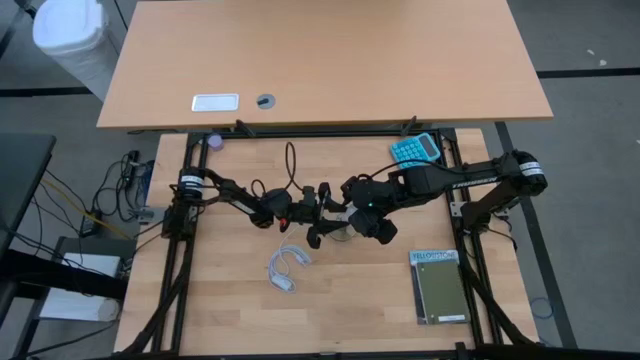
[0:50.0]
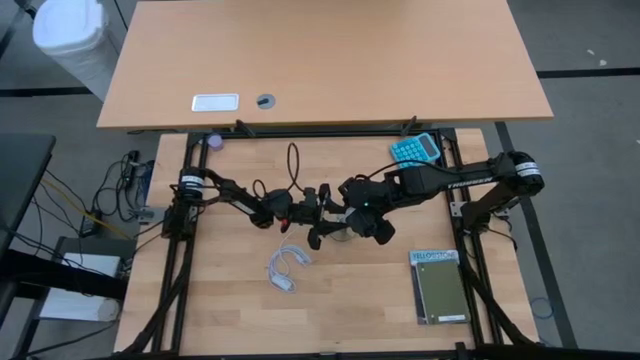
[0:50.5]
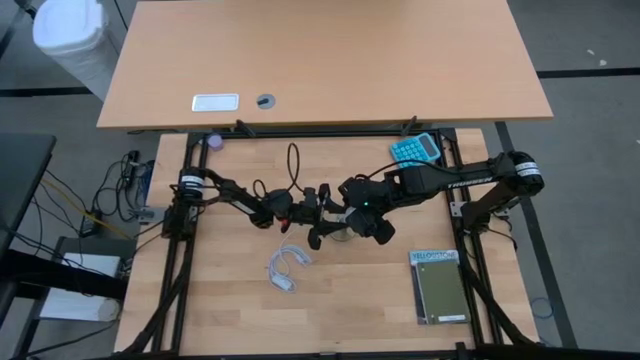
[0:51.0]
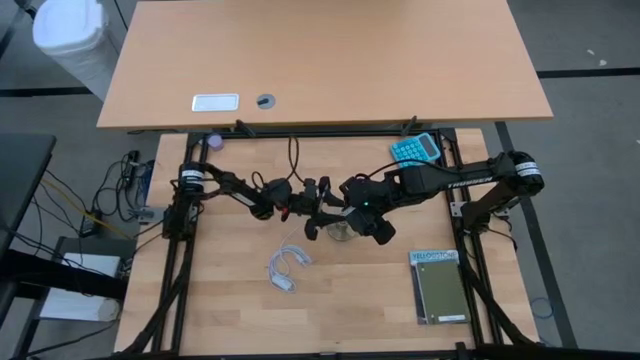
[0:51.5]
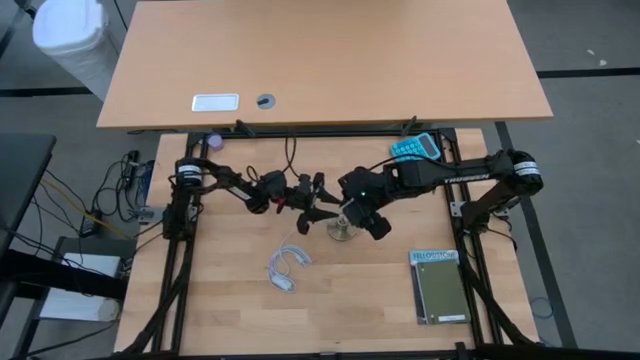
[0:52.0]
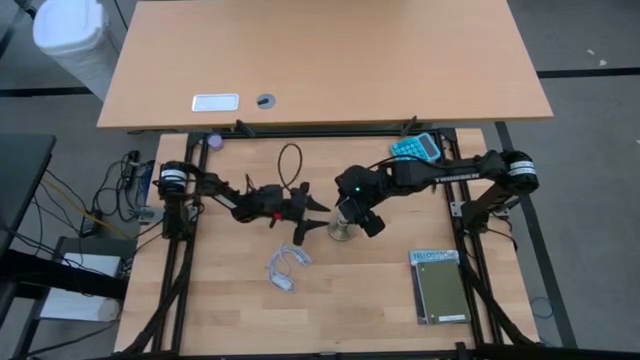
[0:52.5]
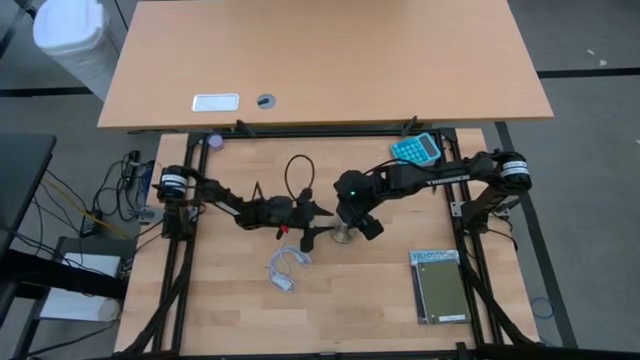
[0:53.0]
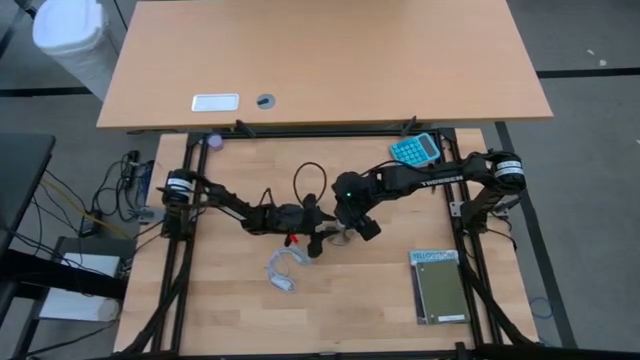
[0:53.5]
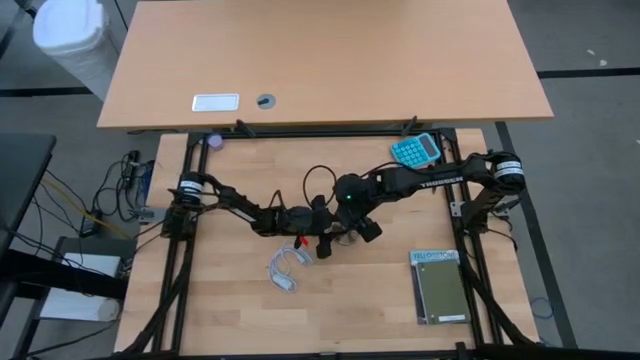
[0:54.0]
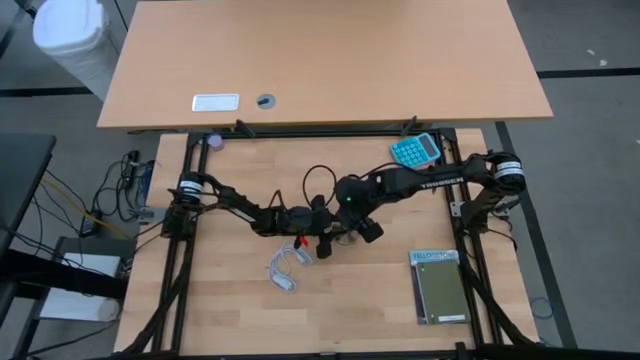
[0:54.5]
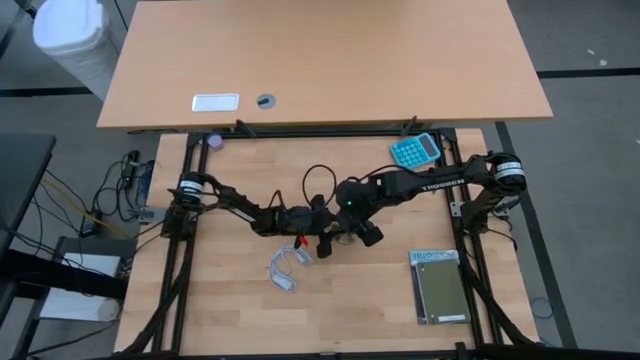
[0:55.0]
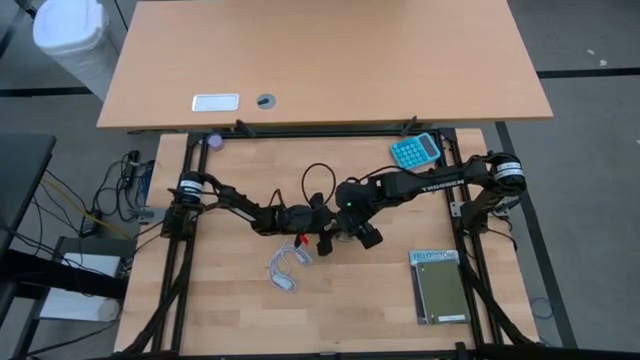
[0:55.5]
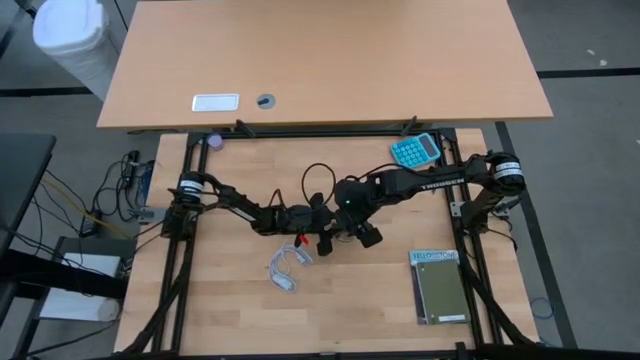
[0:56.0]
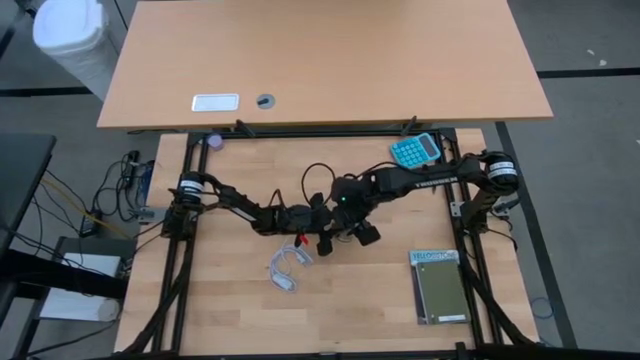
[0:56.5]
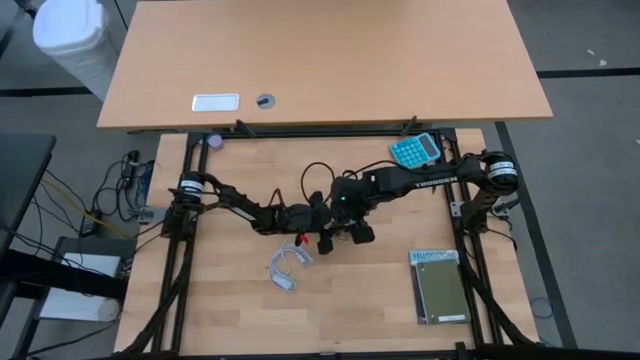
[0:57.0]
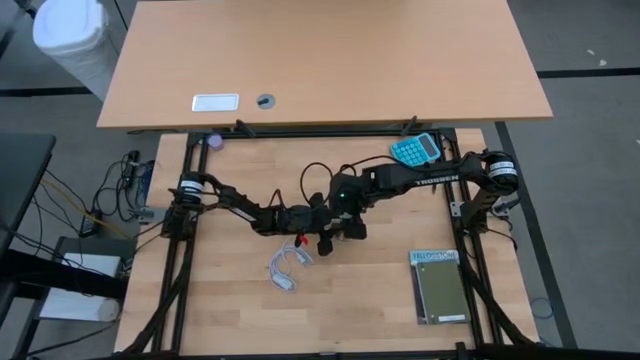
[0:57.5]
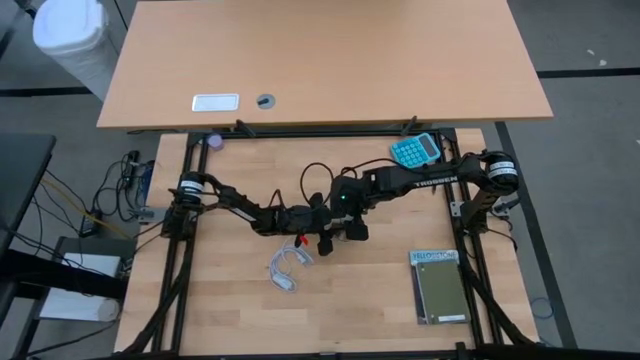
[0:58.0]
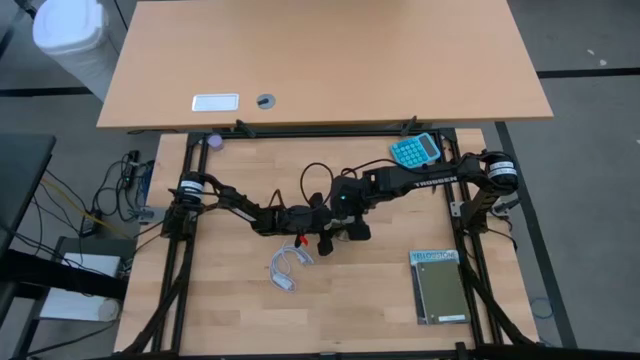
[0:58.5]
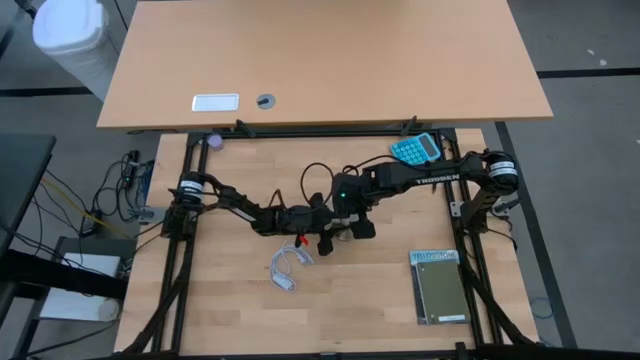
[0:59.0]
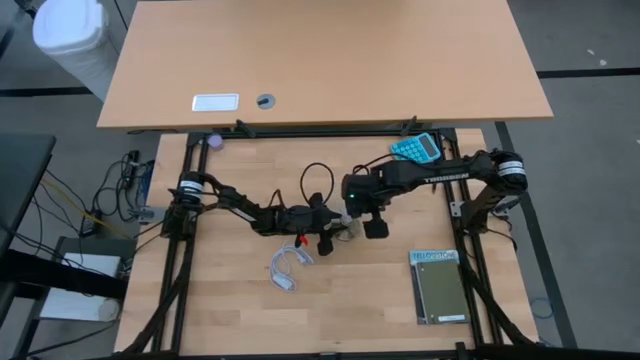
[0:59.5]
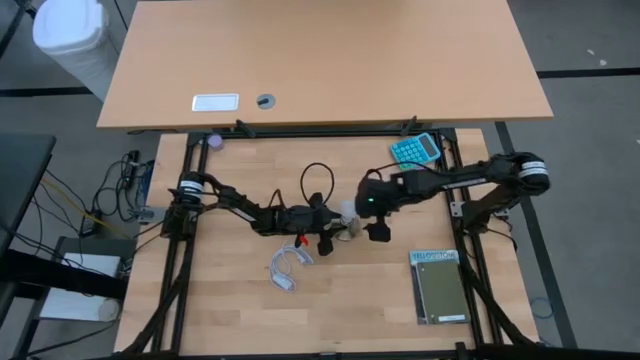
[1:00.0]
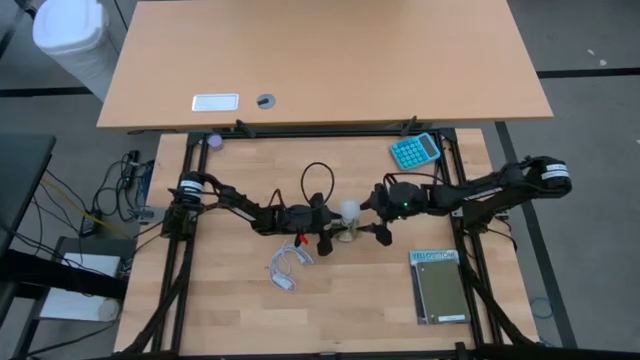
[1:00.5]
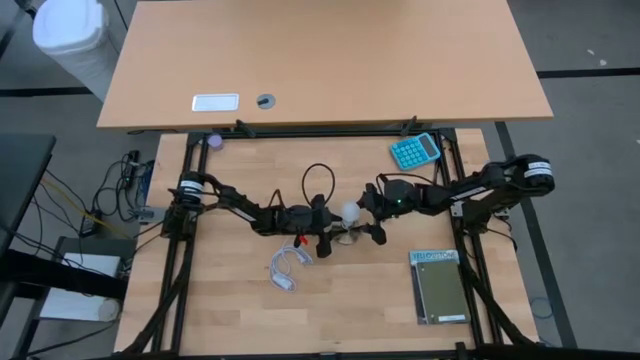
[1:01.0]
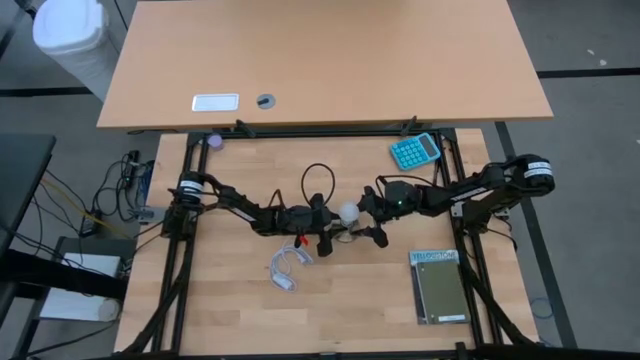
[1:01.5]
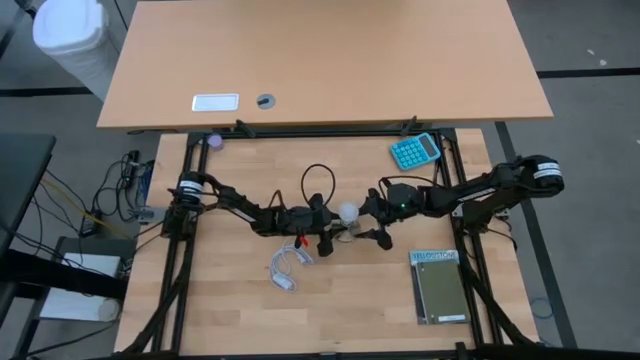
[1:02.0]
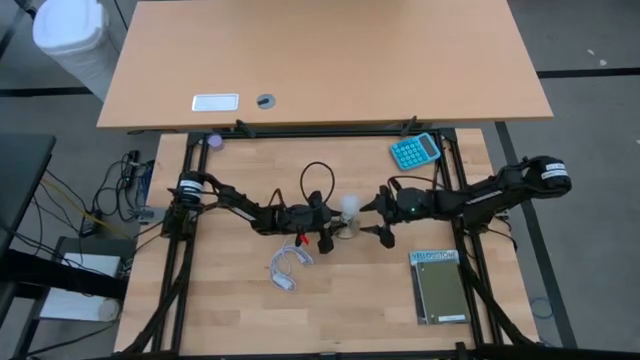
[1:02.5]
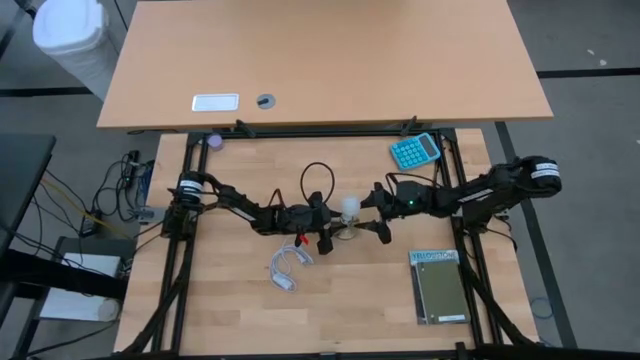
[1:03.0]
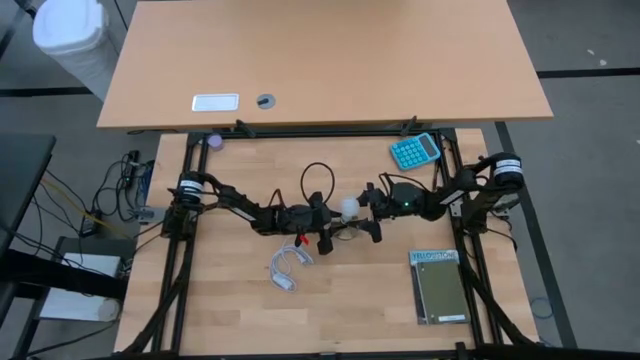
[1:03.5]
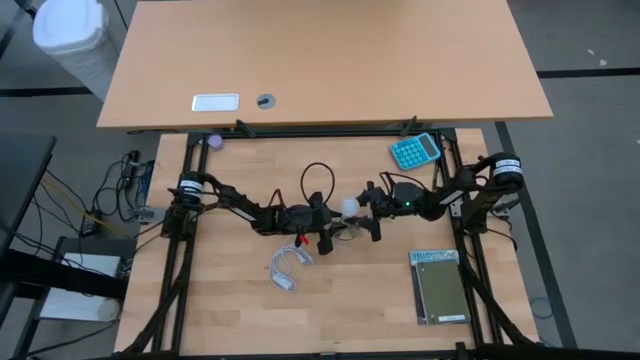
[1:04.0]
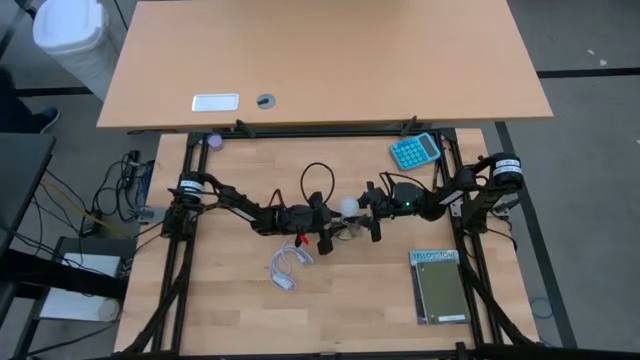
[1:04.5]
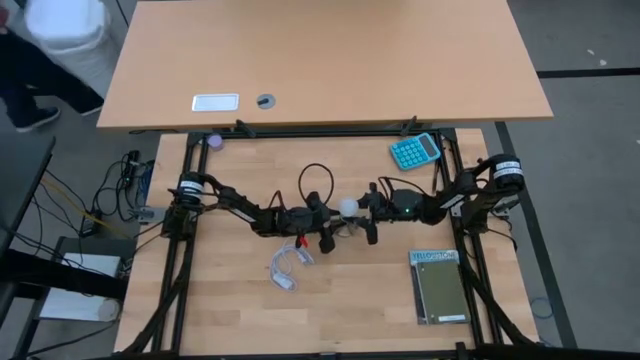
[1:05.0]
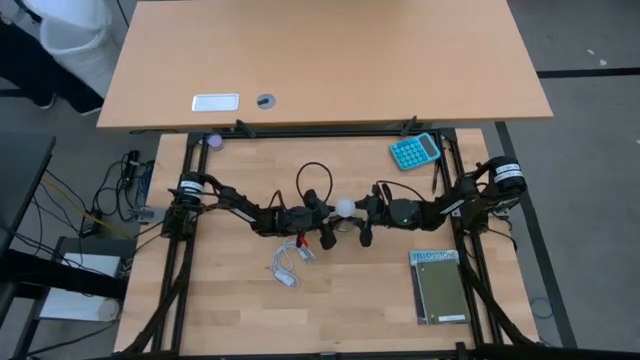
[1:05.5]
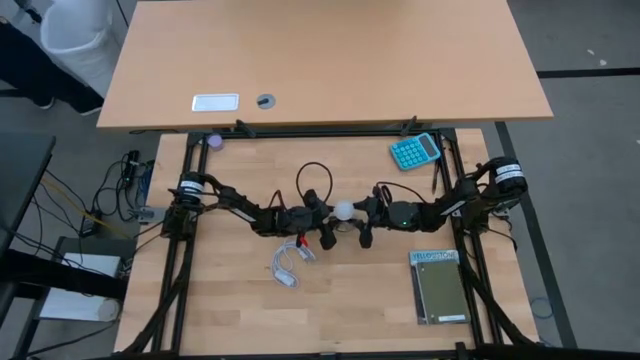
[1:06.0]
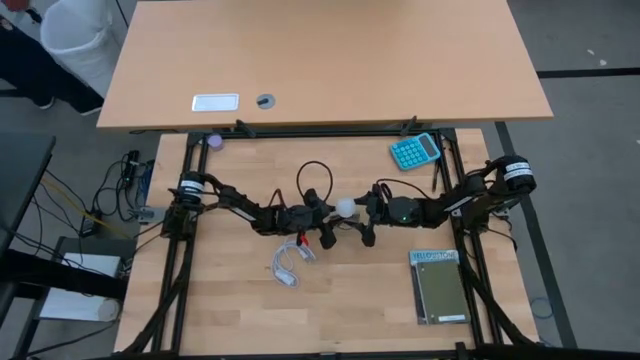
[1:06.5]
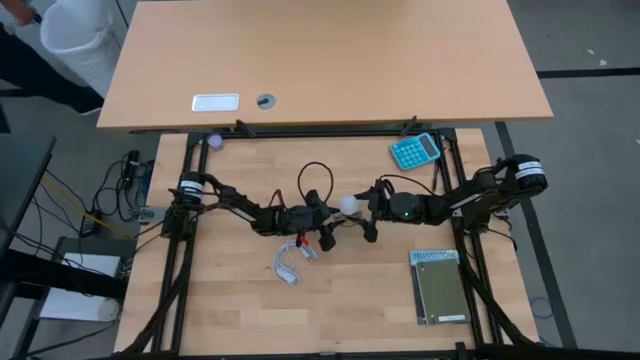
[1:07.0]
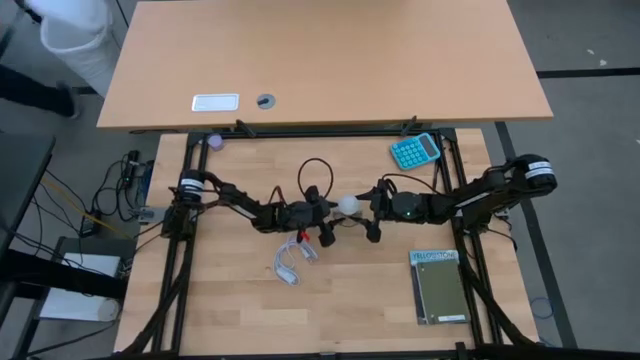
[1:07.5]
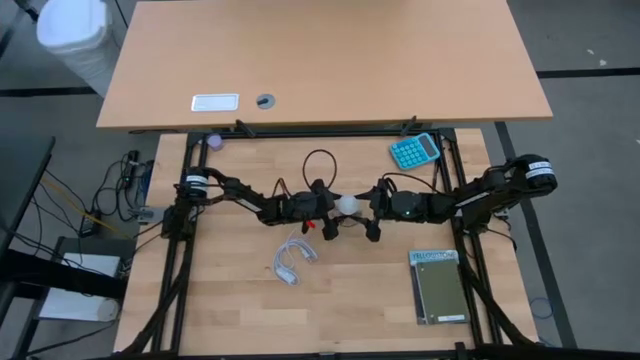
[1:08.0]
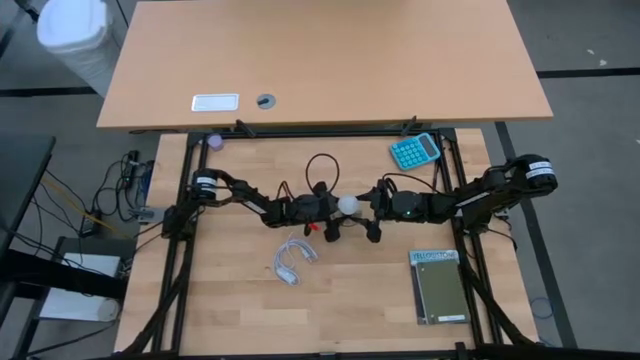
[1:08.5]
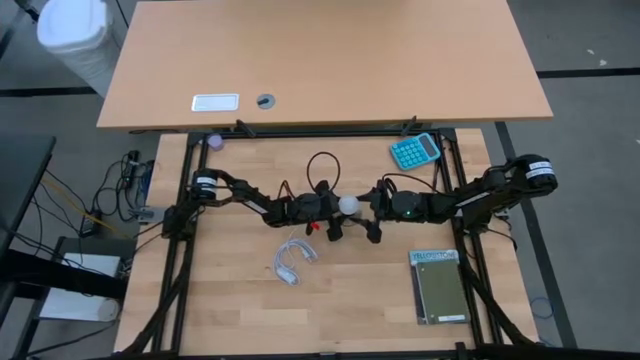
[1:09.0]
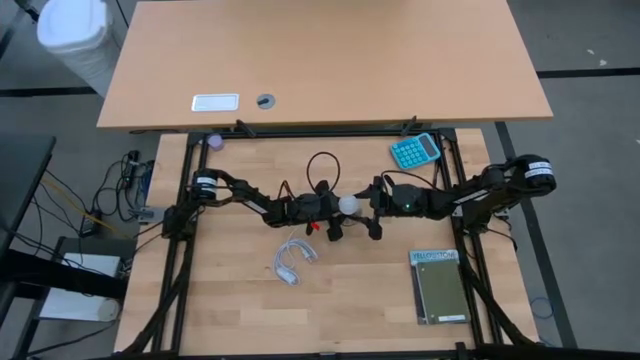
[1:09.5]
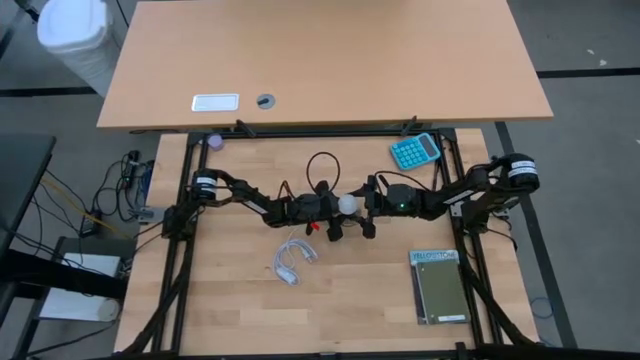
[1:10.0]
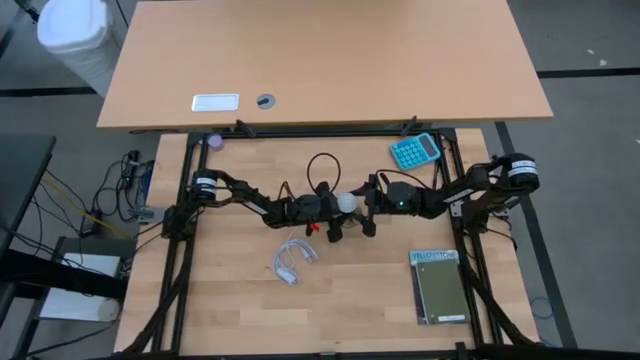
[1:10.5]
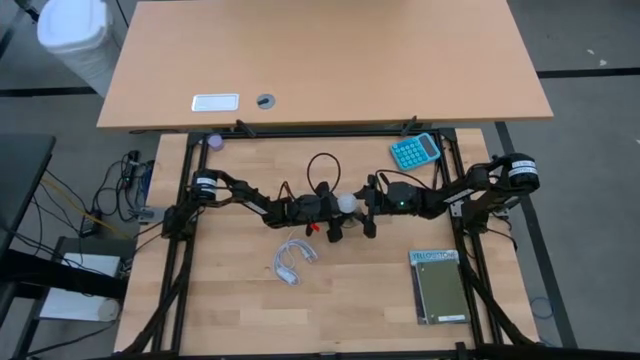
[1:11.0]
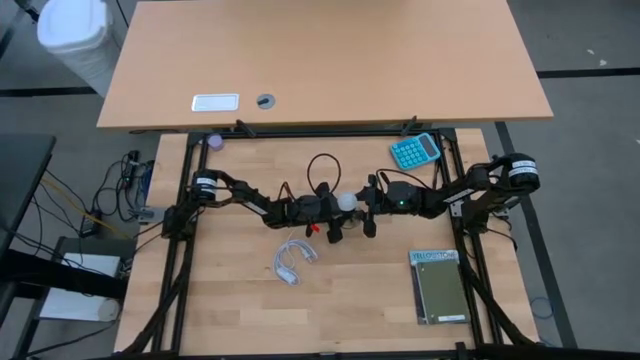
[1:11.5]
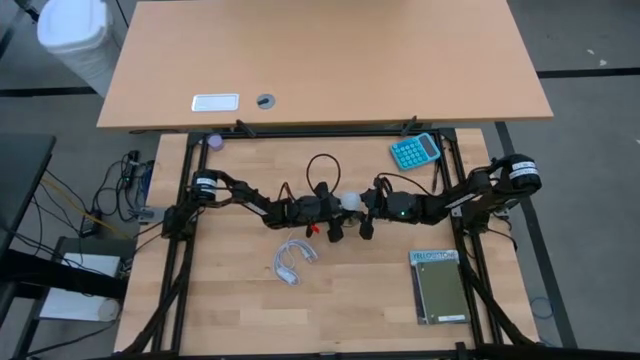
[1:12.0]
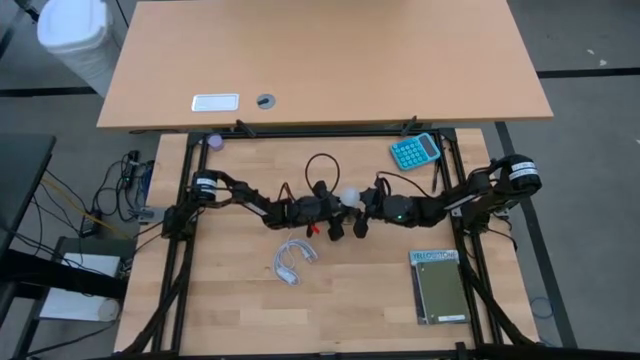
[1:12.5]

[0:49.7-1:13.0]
Task: Screw lightbulb
Insert the lightbulb into the socket
